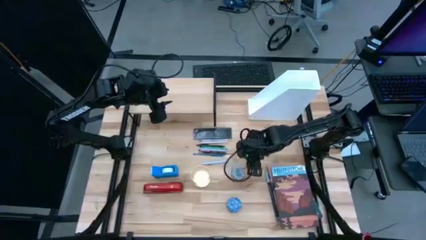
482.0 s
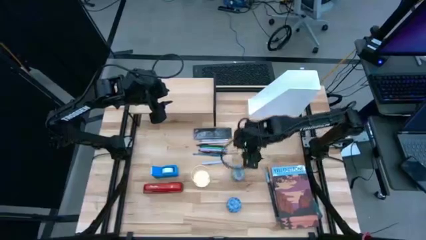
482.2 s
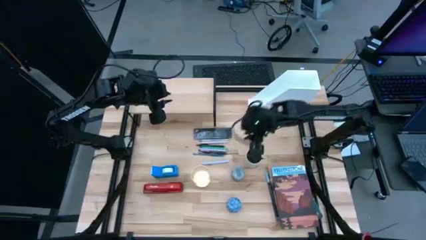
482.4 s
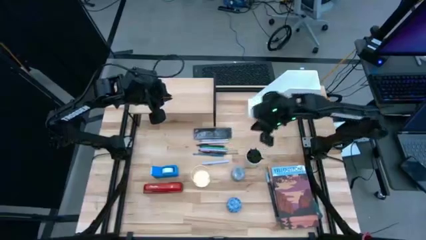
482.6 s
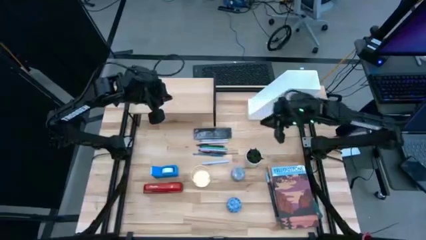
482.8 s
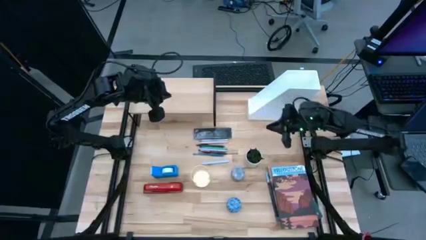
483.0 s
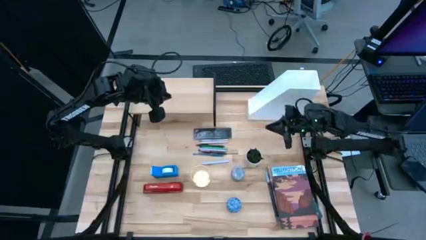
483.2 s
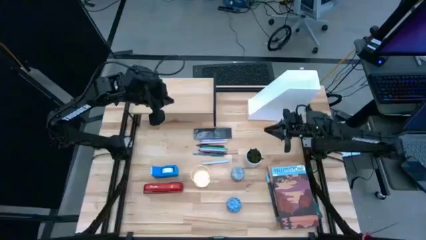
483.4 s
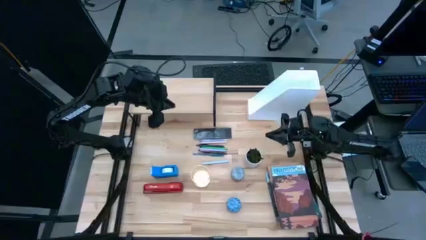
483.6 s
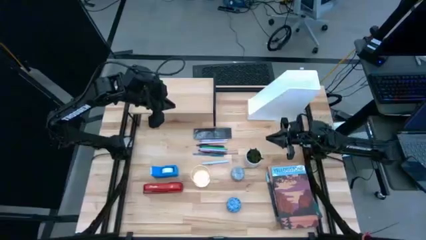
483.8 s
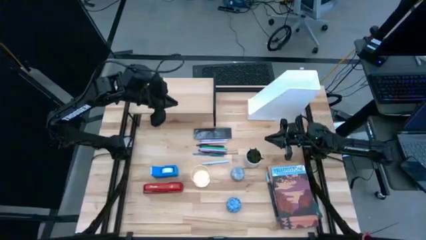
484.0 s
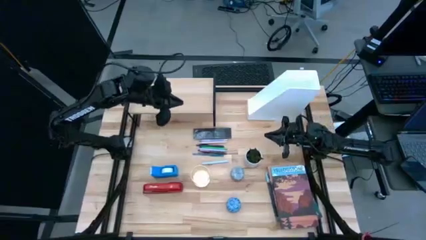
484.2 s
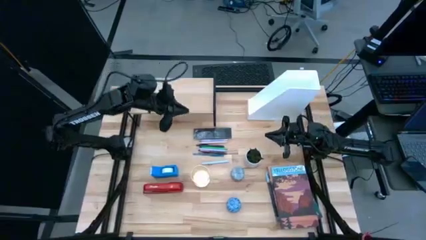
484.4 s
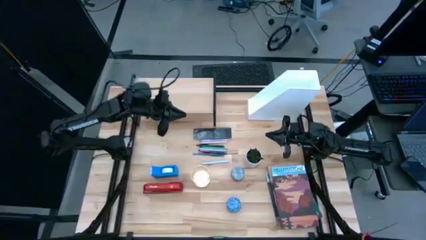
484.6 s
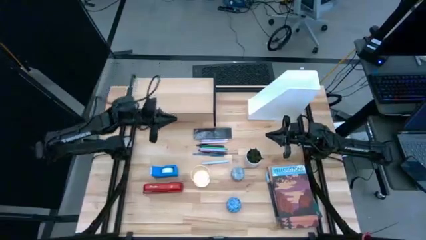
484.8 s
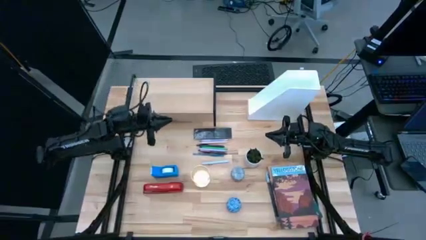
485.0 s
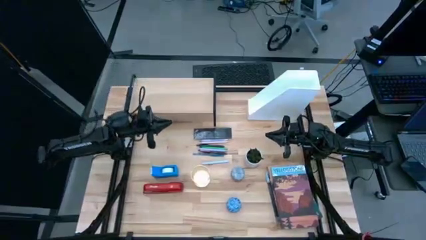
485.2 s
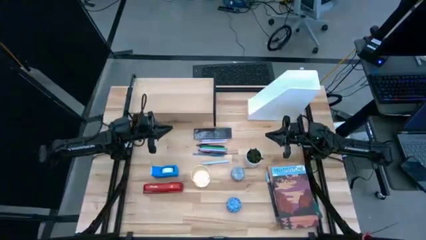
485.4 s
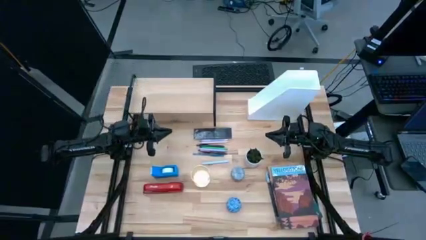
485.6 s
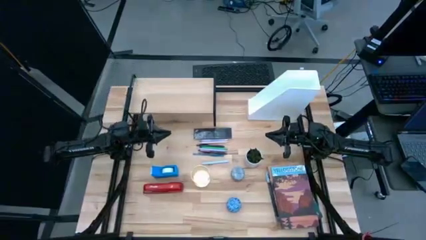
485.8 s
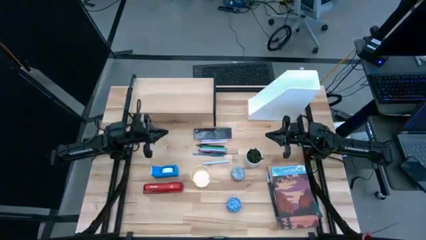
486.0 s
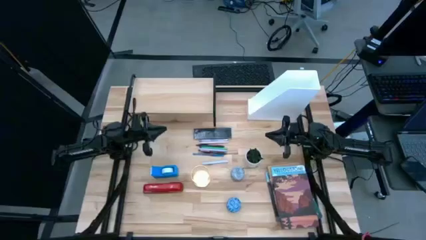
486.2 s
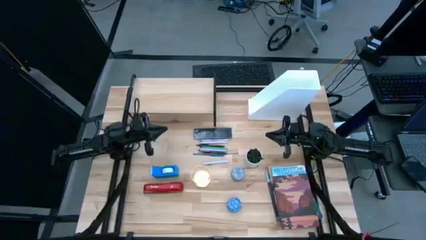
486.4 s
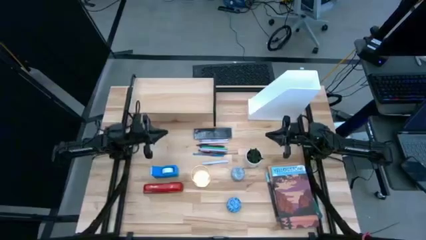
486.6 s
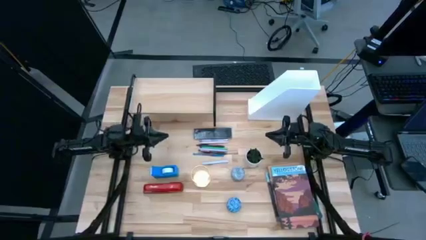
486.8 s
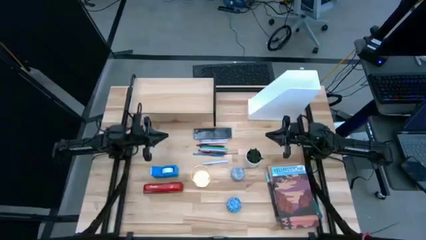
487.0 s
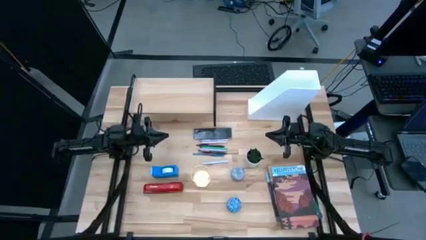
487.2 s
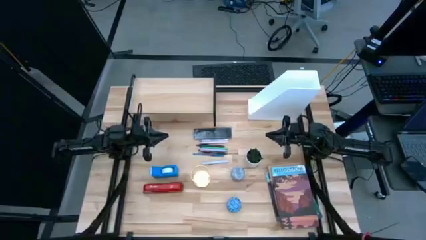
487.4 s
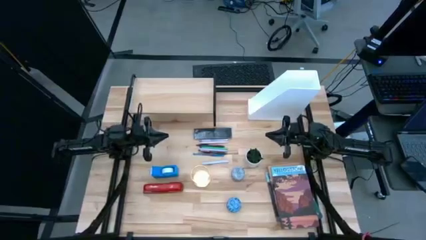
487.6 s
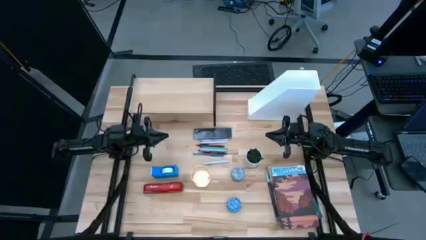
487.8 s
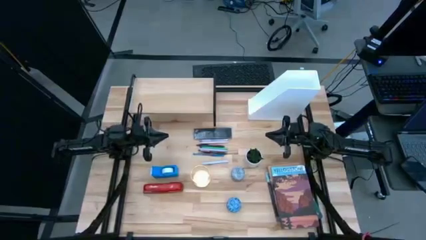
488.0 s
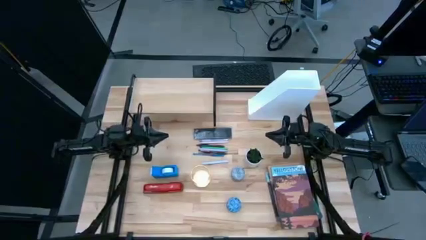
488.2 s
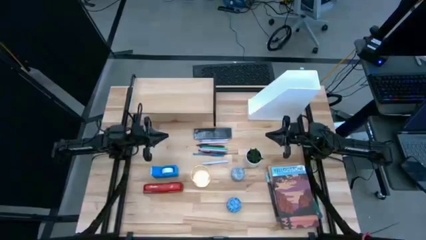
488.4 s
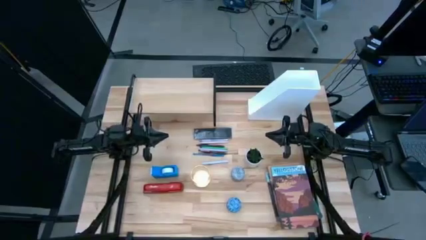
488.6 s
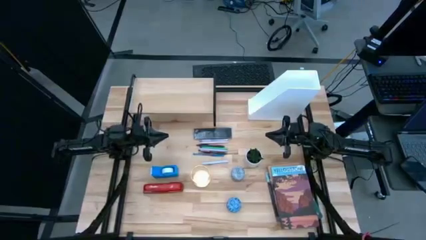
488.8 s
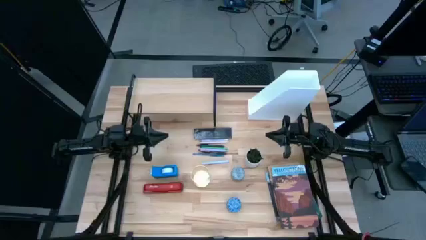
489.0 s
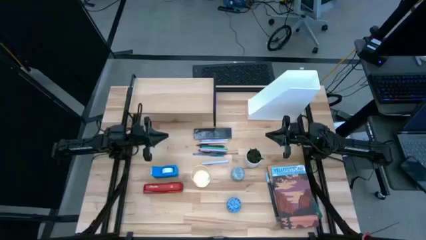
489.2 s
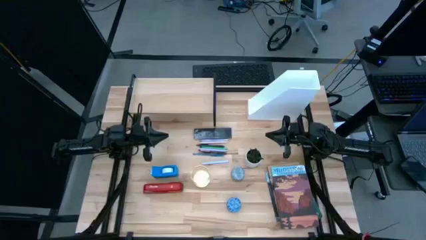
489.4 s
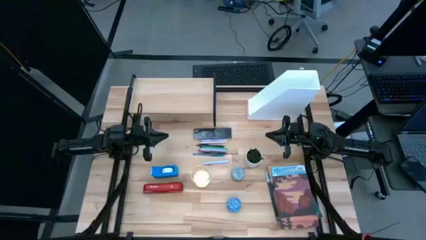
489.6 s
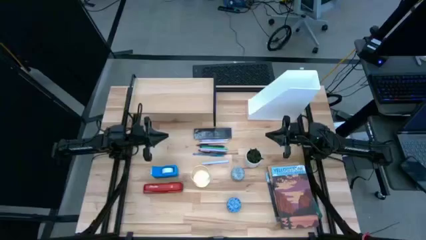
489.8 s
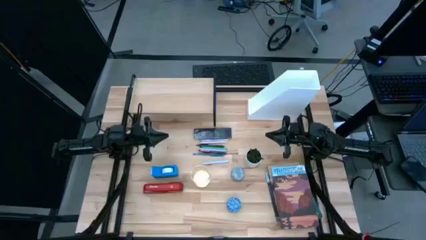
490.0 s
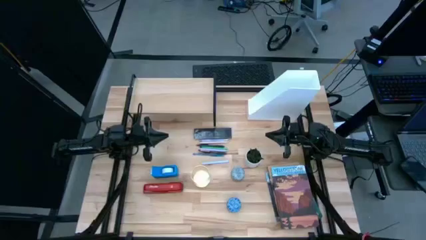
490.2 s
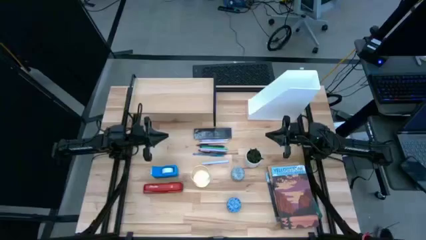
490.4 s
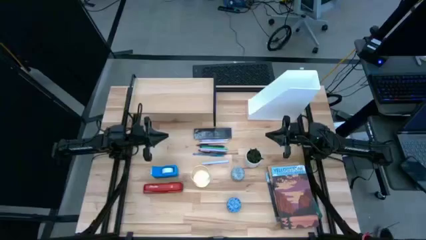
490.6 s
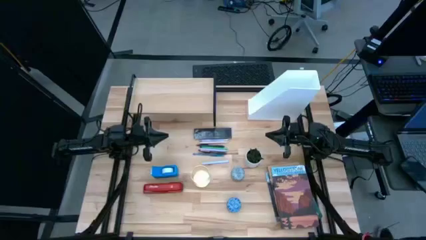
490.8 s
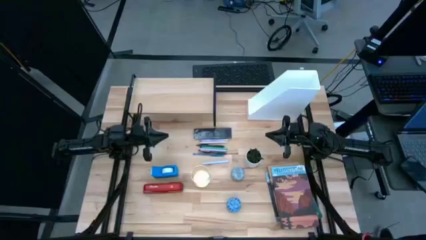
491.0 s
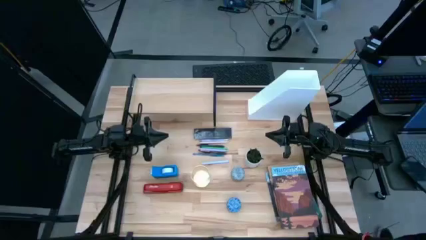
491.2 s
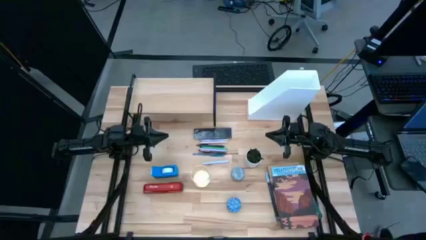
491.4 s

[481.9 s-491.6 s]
Task: Stock shelves
Return to Home Position

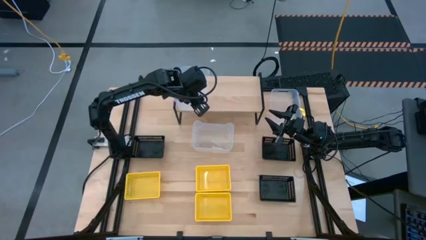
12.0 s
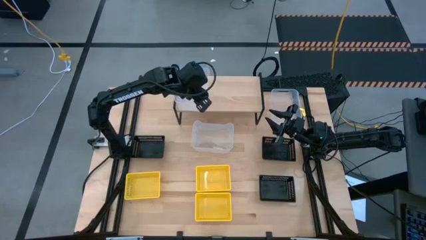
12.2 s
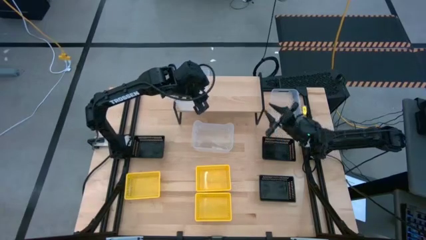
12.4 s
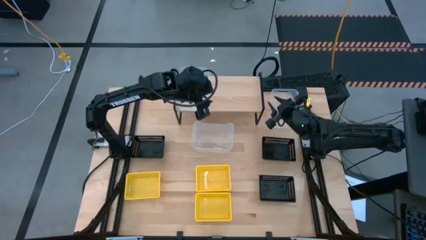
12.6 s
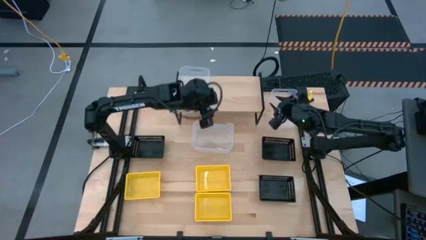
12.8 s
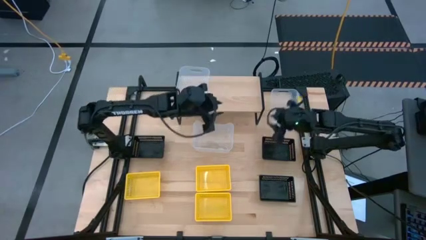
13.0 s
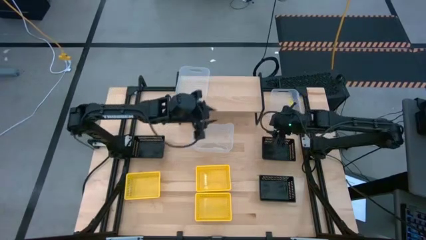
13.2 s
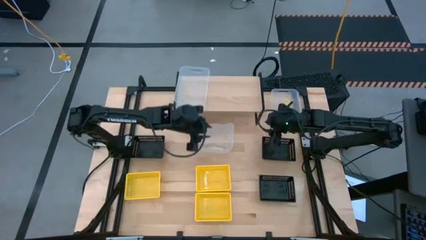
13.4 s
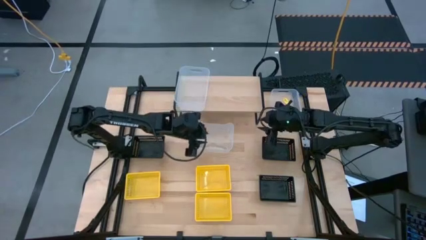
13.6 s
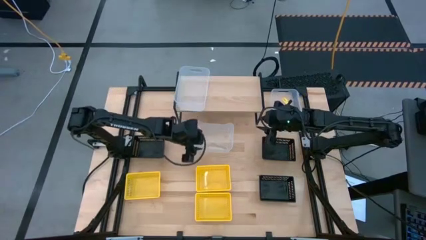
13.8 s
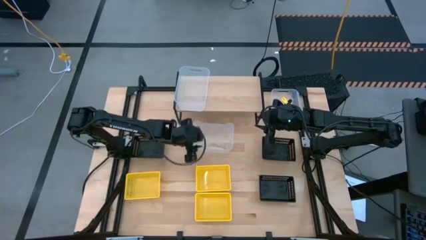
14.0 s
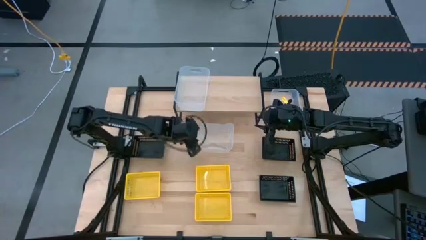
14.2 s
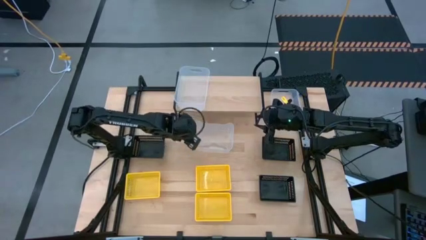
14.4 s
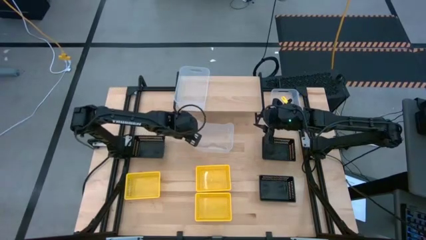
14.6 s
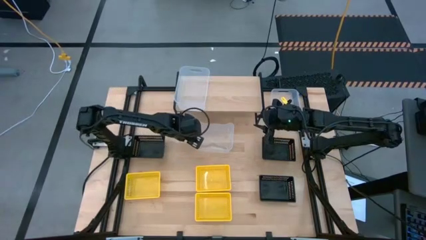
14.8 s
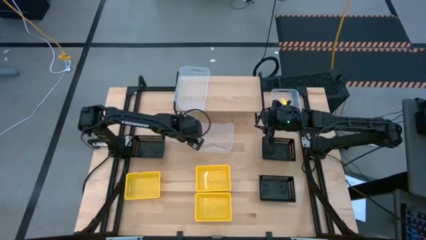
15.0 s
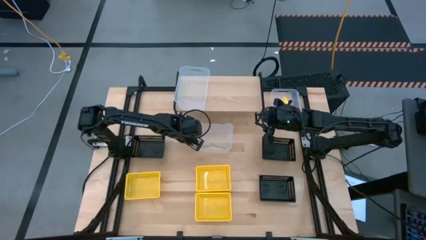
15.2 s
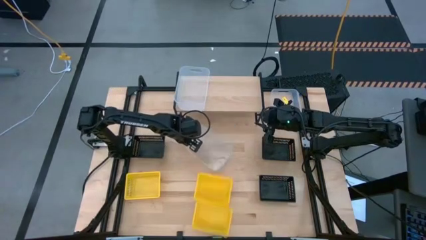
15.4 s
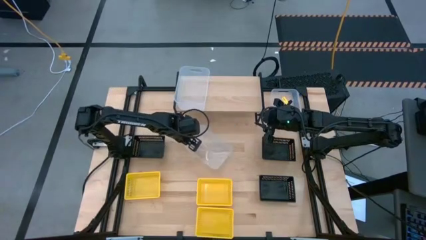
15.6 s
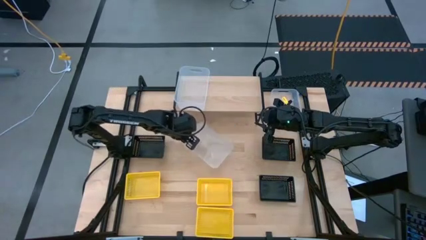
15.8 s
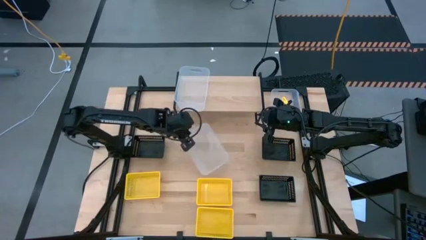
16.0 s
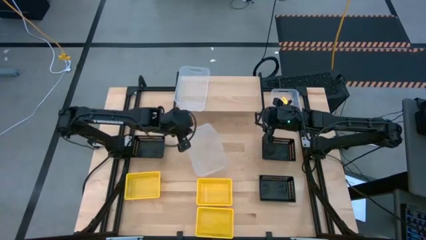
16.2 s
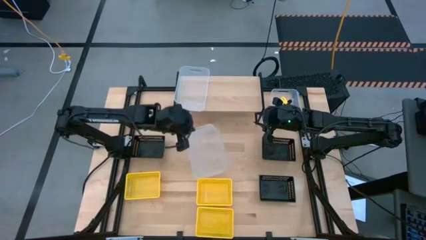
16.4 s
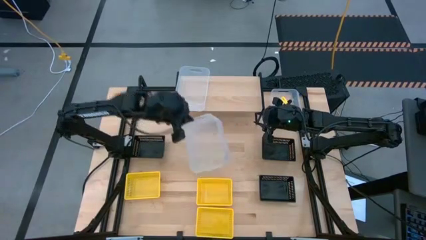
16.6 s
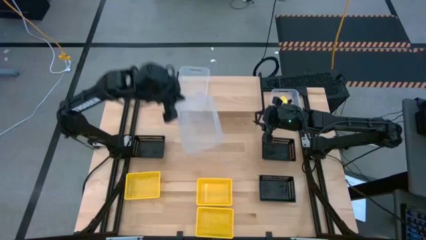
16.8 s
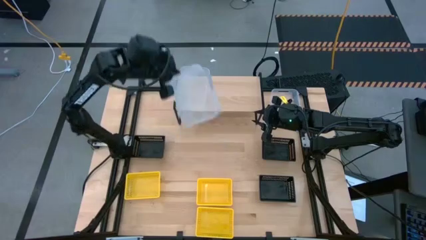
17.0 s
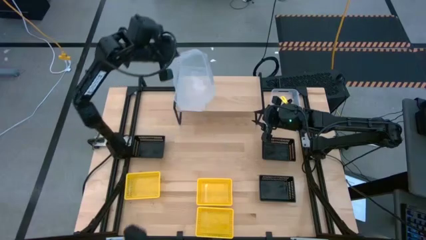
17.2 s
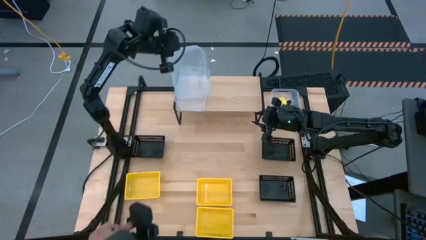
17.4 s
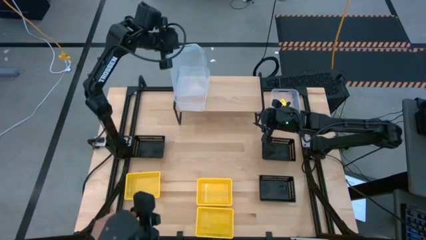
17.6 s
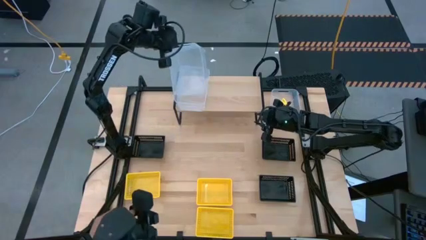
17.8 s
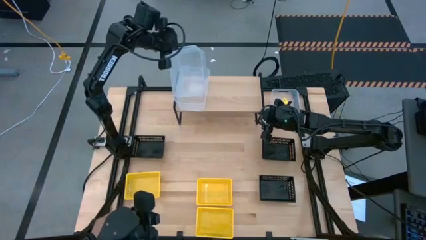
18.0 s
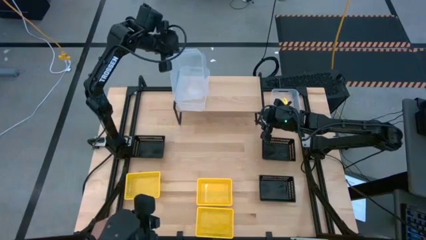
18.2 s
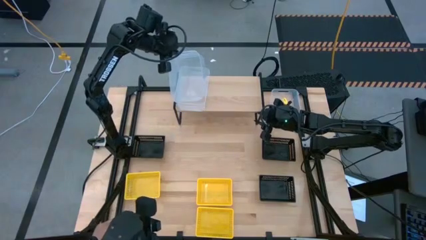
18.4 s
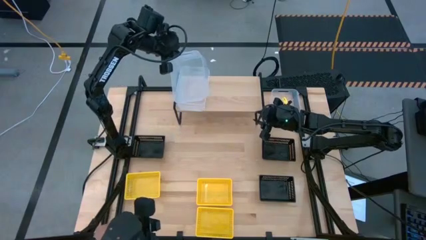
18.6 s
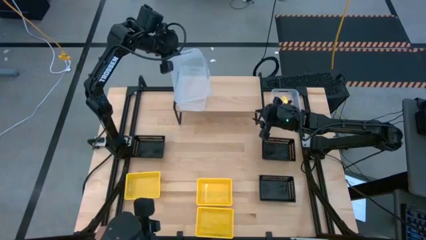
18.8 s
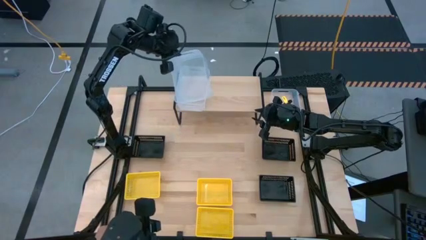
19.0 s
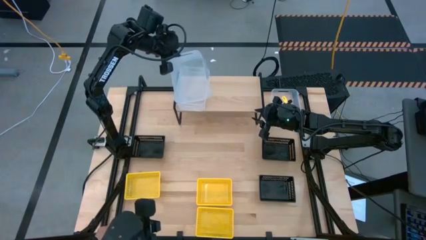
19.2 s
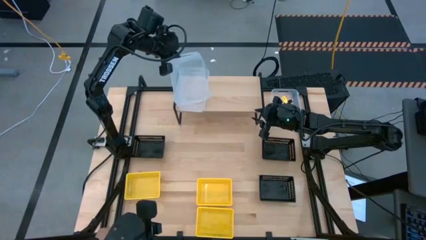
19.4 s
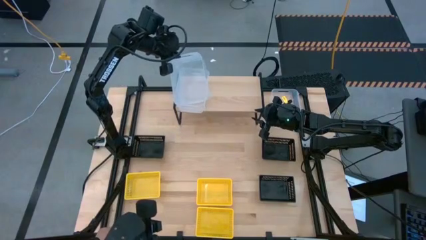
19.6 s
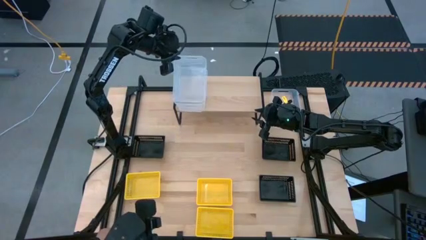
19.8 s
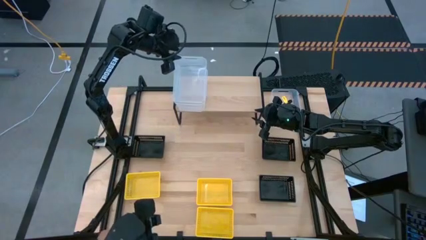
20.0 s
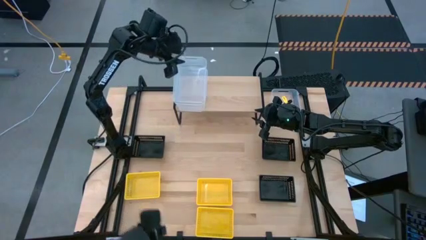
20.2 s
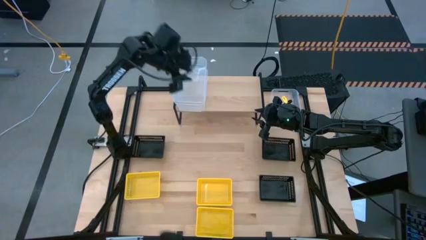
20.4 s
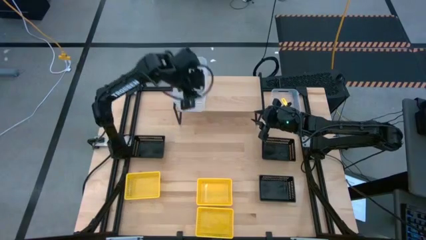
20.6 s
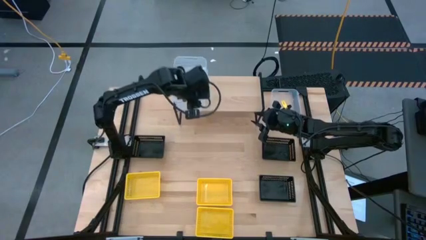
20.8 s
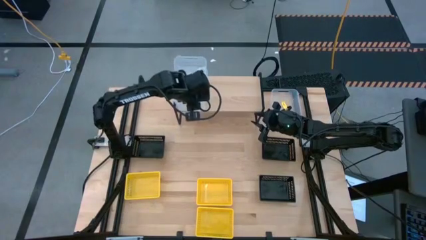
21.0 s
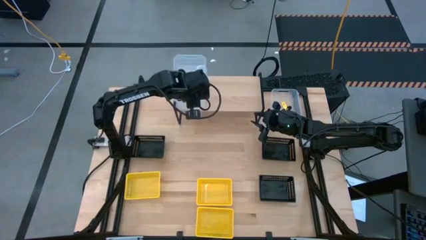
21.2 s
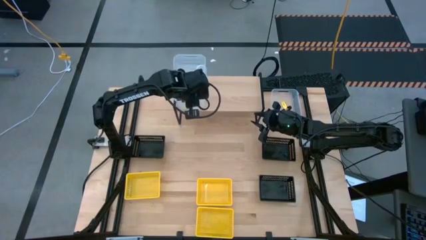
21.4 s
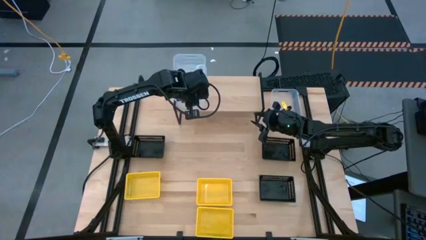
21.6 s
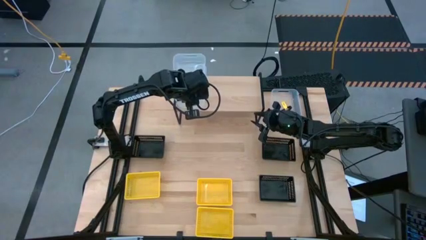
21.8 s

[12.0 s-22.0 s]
Task: Stack baskets on shelf by color
Stack the middle transparent bin on top of the transparent bin on the shelf
